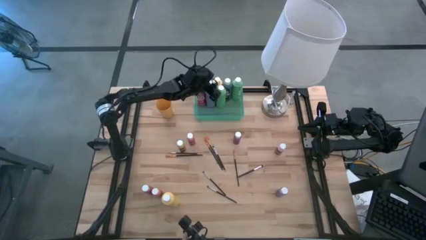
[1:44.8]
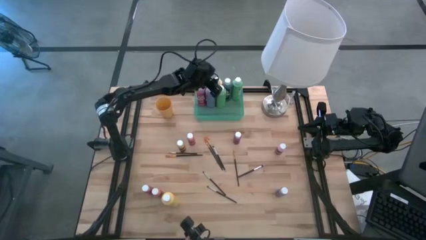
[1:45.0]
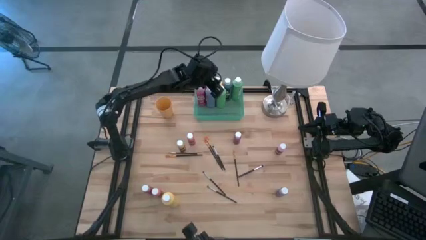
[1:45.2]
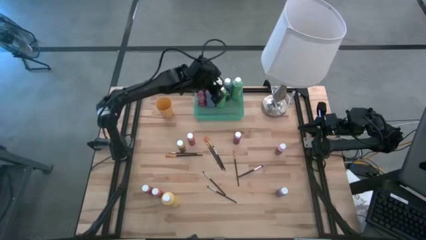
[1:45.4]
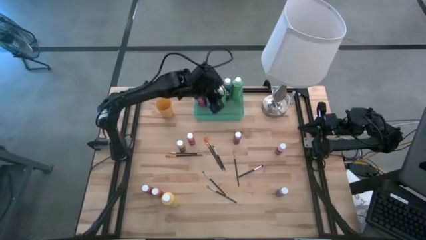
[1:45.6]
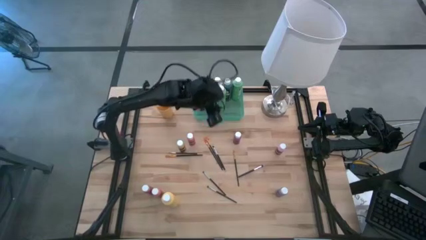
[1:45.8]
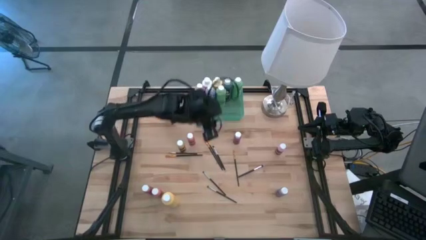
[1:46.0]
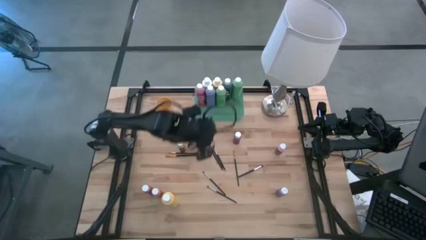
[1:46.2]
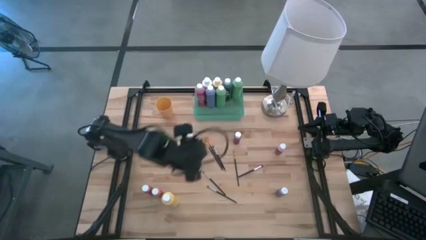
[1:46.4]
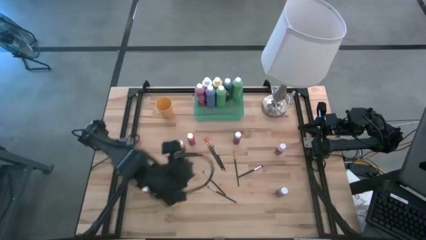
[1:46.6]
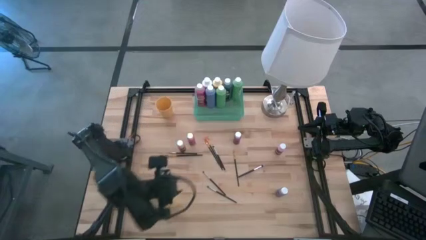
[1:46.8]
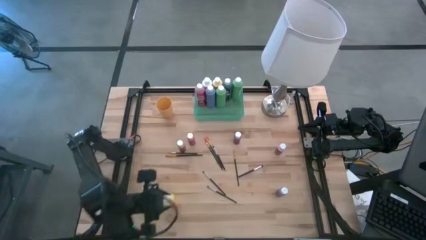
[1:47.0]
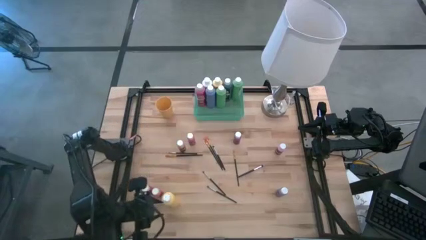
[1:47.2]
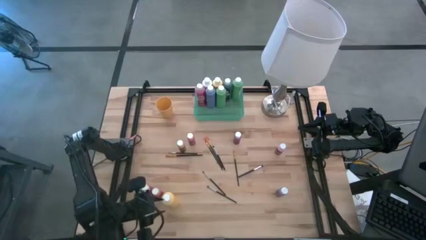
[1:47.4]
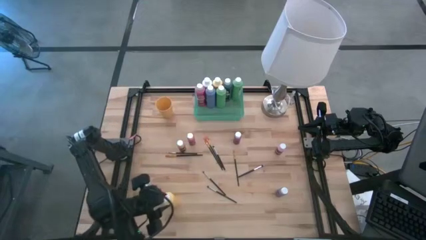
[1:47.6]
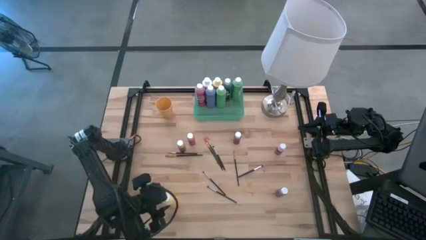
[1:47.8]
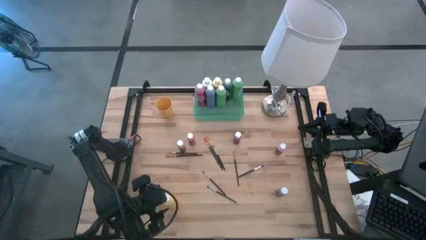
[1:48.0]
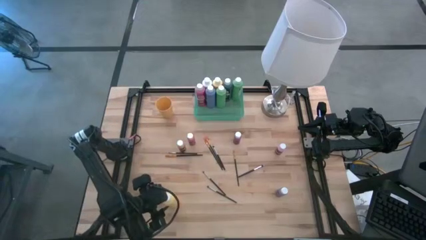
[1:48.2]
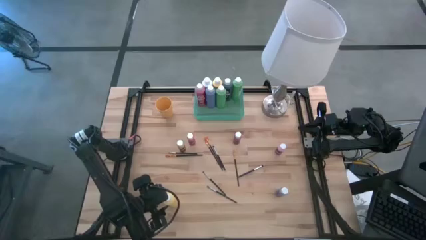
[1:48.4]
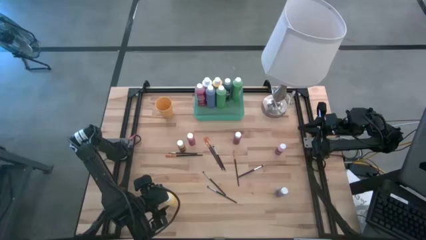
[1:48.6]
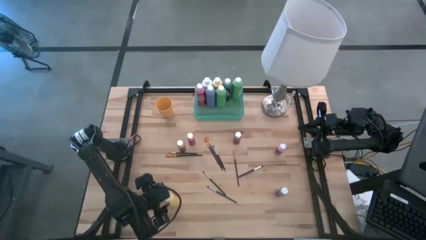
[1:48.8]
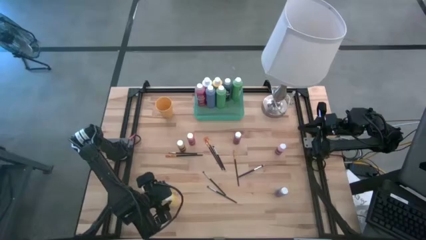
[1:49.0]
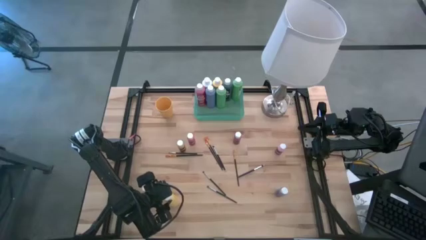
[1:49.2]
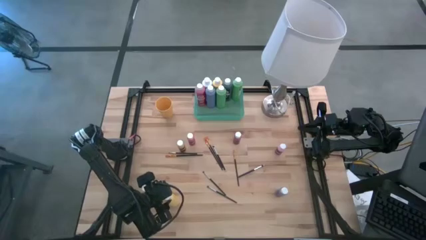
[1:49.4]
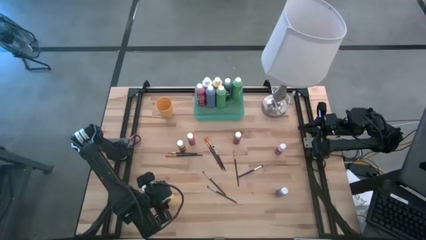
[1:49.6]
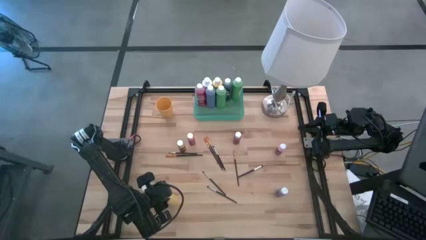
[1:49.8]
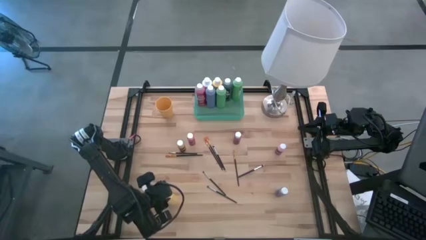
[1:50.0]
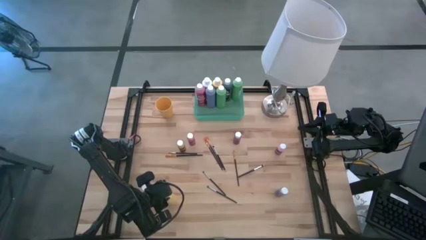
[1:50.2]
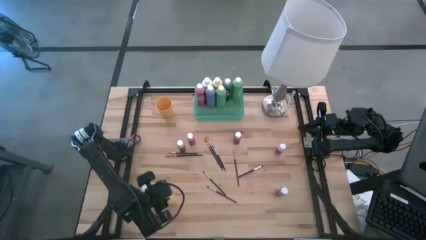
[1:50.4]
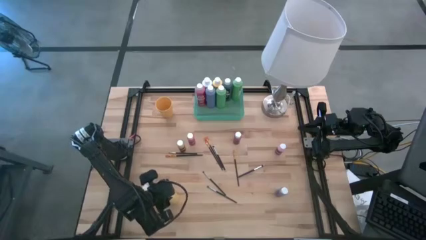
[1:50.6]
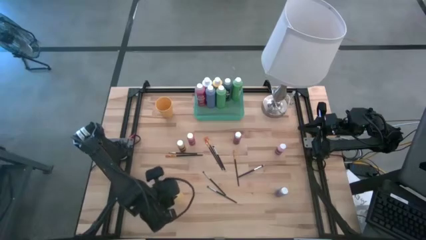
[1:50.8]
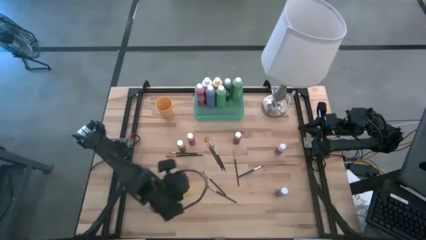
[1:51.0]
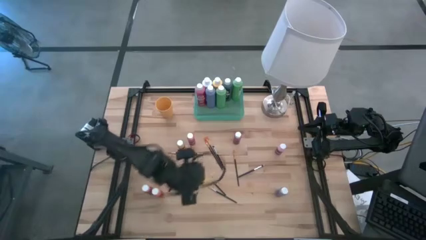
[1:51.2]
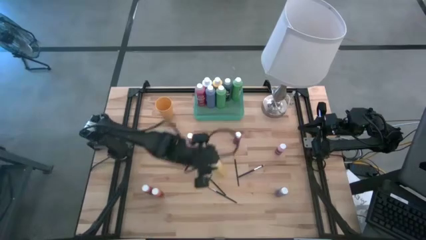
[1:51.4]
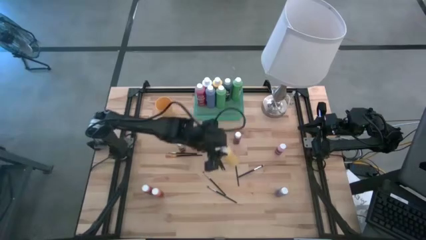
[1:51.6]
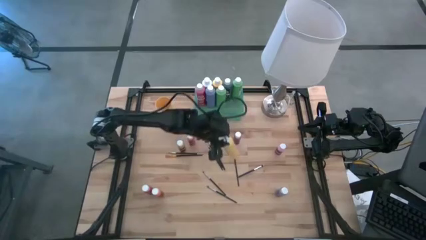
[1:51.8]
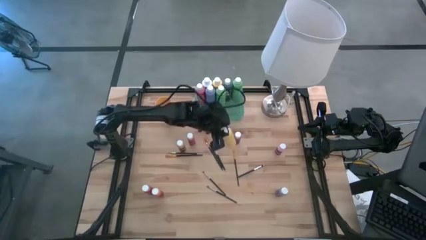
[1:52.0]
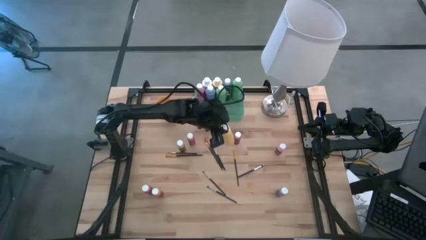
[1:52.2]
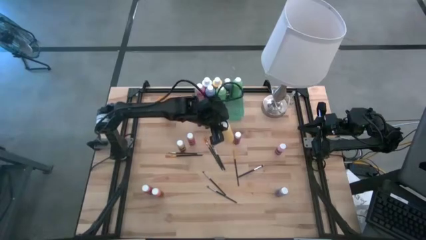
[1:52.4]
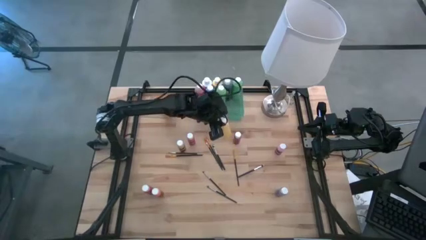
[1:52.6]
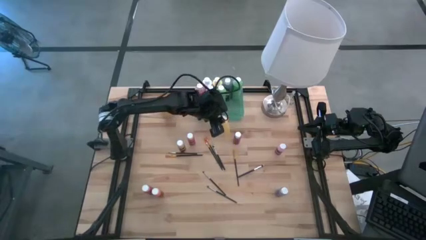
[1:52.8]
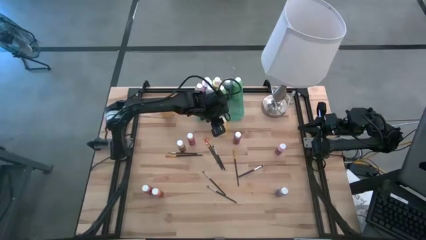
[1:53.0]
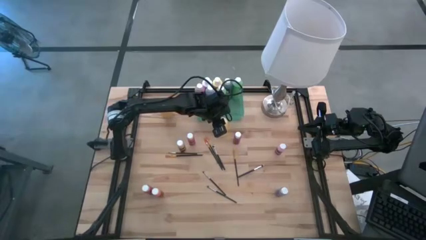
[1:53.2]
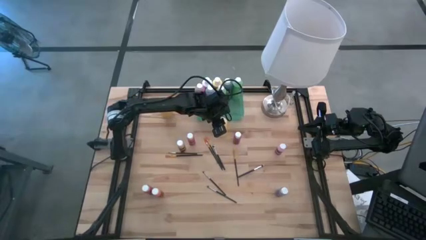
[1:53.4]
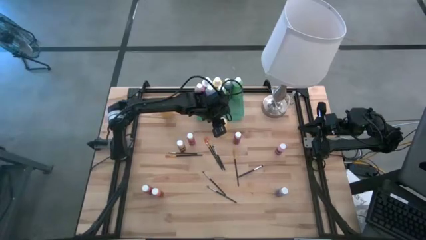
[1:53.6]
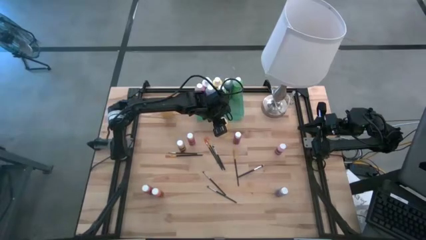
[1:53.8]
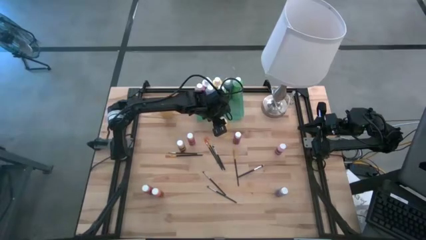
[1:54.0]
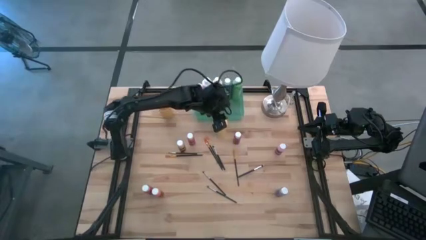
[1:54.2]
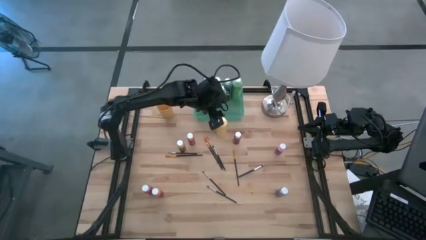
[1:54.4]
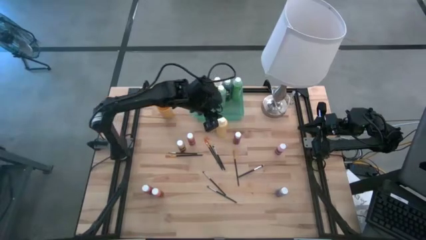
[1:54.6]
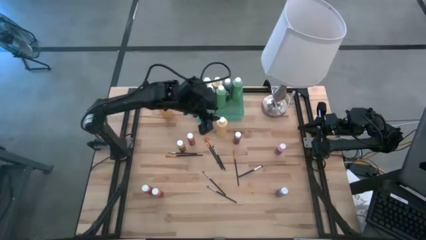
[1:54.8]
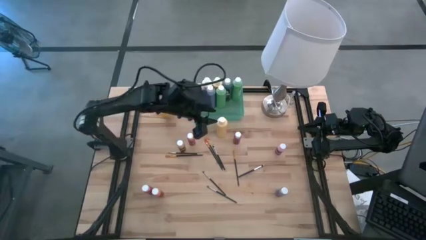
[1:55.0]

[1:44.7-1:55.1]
Task: Pick & Place Paint Supplies
Put the large yellow paint bottle into the green bin
